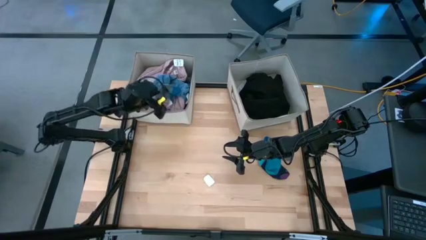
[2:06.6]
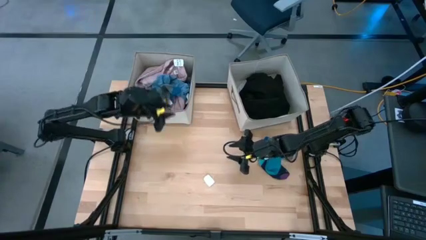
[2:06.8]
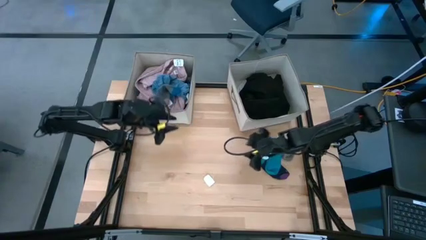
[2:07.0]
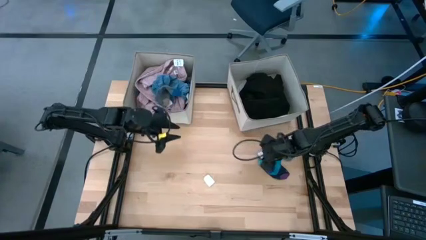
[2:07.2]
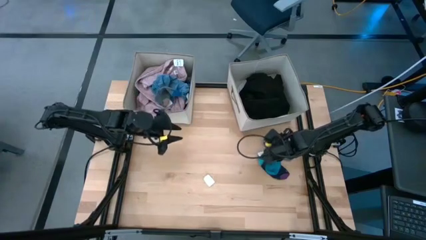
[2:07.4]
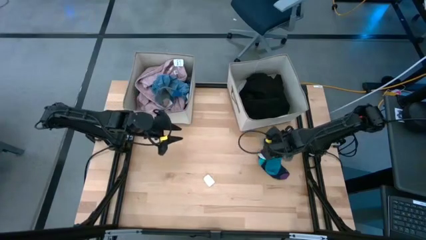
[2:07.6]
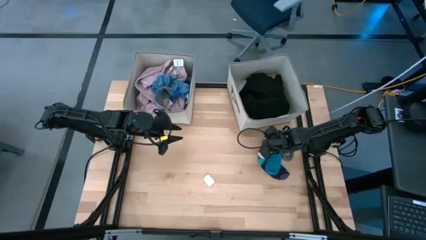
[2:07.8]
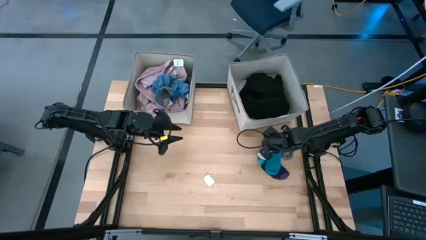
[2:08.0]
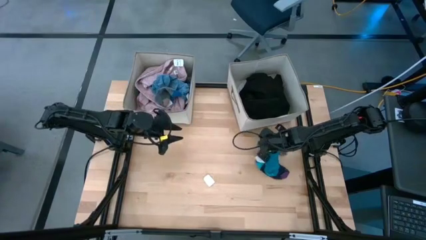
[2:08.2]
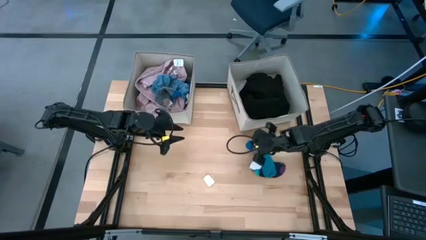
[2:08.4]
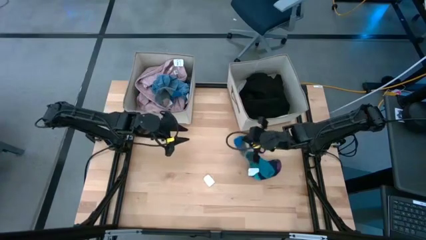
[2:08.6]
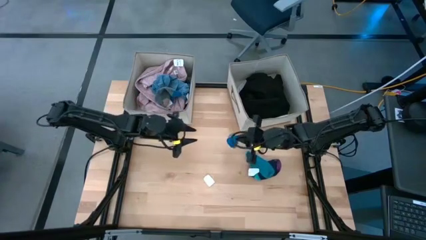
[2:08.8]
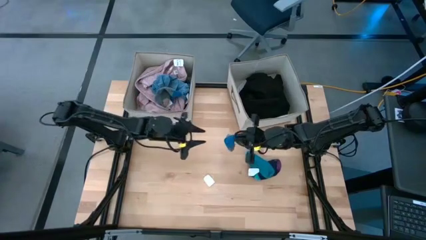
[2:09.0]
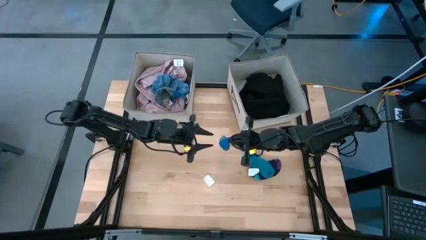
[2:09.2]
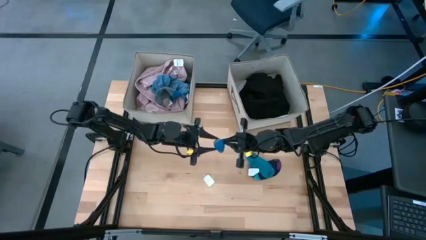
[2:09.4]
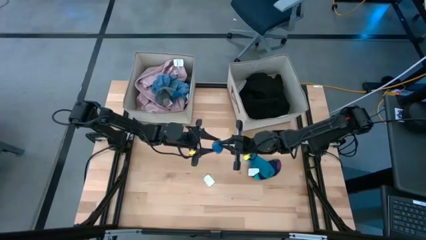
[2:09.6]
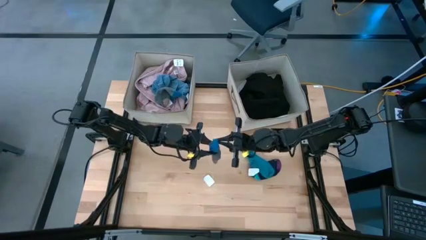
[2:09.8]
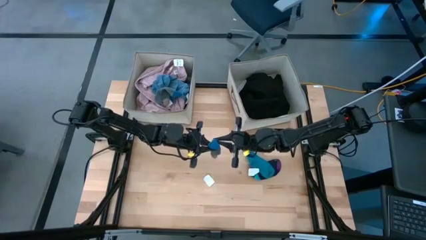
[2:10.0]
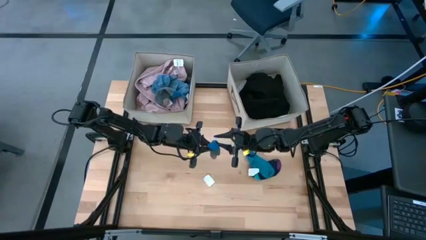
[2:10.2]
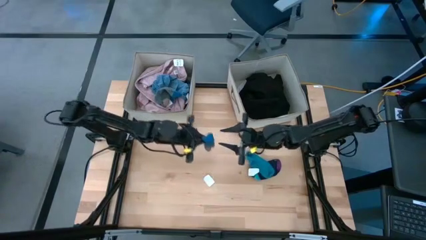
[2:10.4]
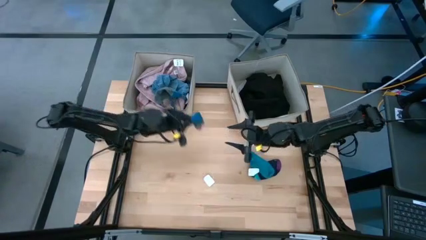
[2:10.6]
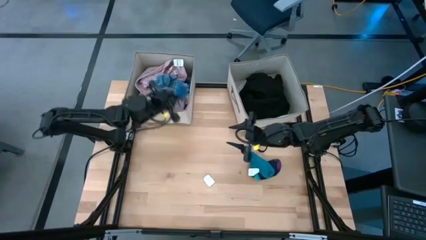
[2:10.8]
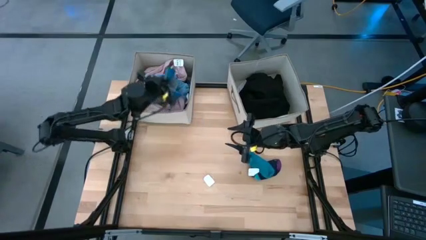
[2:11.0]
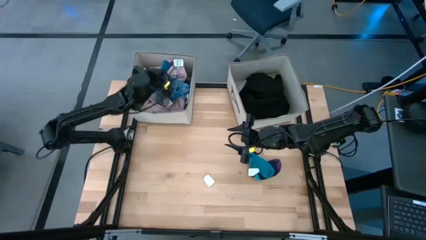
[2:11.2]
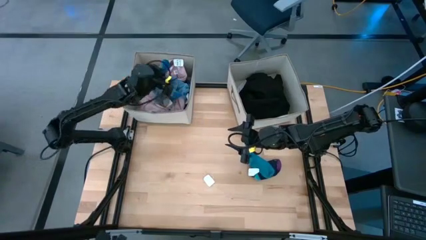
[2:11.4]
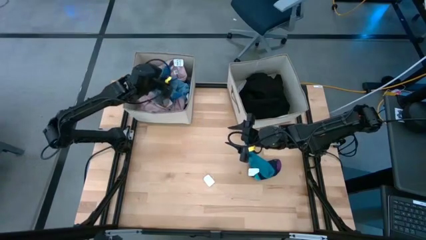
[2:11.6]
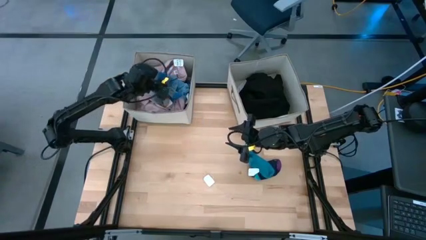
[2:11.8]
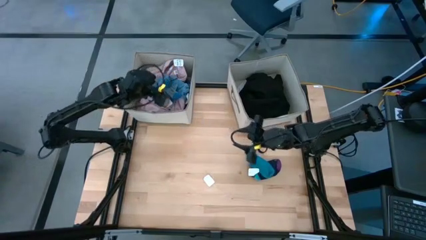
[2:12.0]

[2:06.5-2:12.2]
Task: Sort clothes
Put the gray sock into the left brown laundry organizer

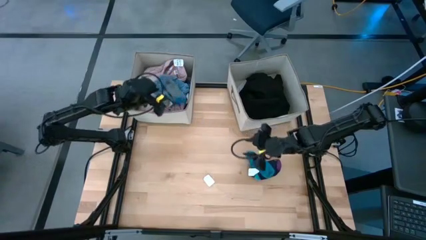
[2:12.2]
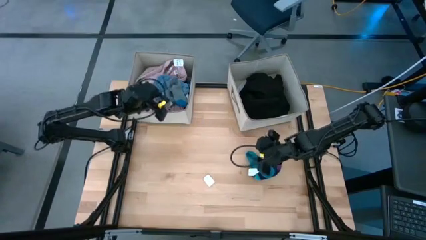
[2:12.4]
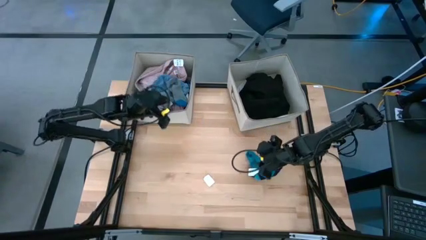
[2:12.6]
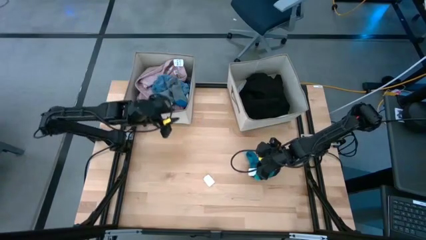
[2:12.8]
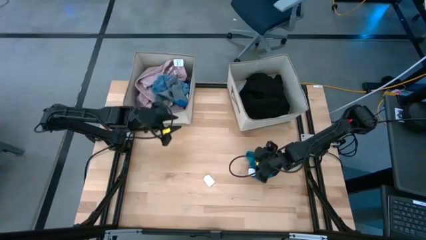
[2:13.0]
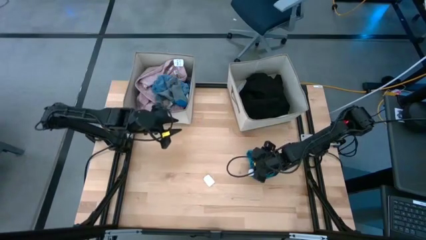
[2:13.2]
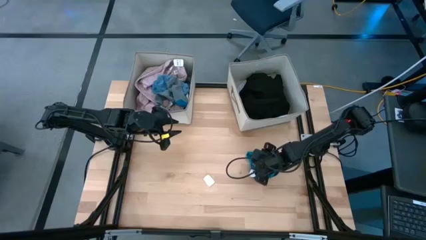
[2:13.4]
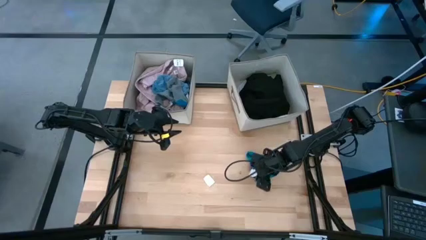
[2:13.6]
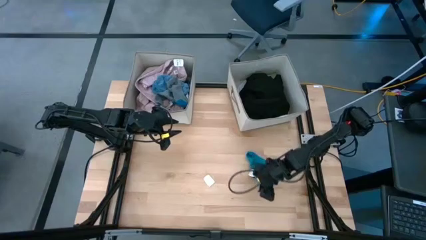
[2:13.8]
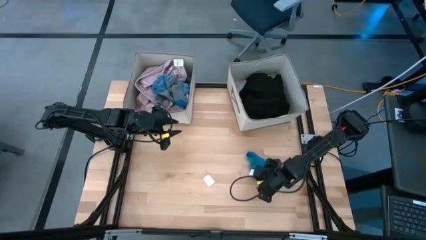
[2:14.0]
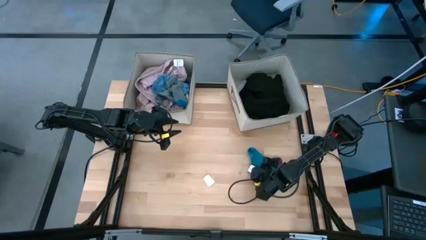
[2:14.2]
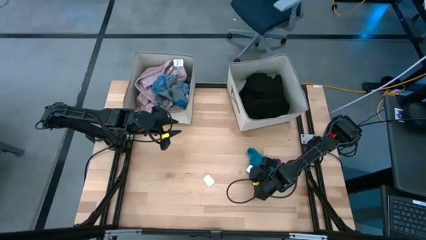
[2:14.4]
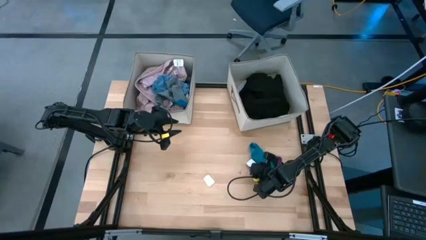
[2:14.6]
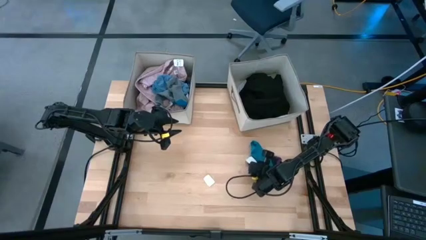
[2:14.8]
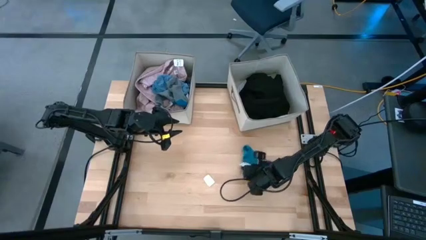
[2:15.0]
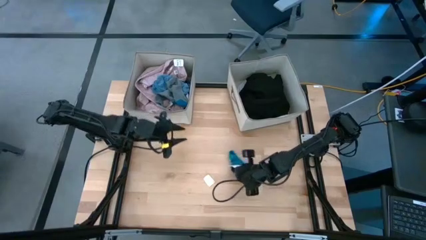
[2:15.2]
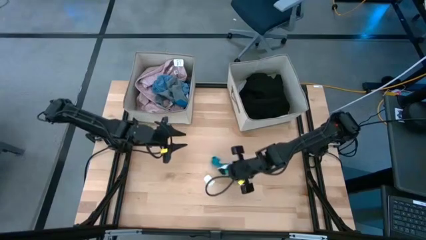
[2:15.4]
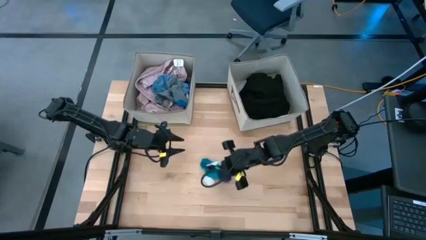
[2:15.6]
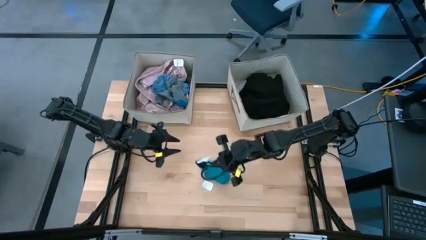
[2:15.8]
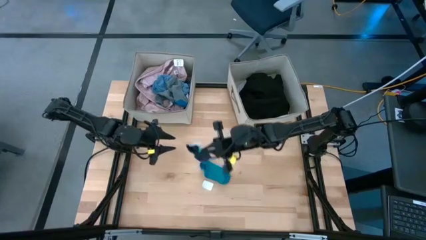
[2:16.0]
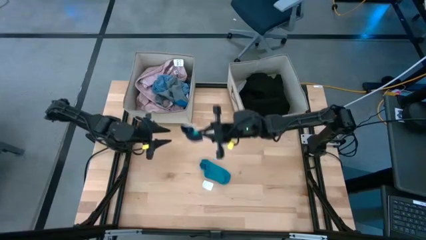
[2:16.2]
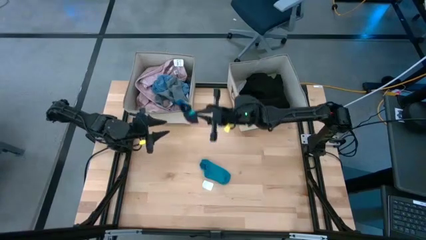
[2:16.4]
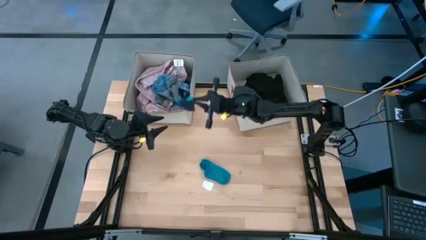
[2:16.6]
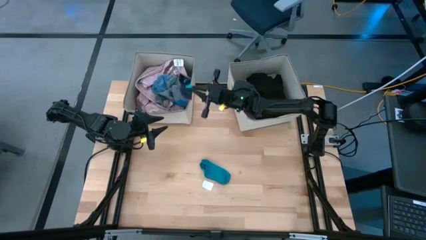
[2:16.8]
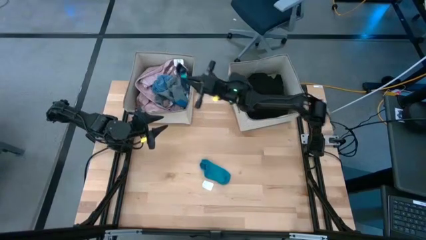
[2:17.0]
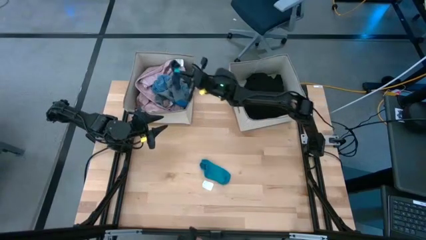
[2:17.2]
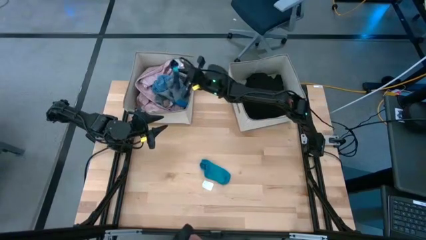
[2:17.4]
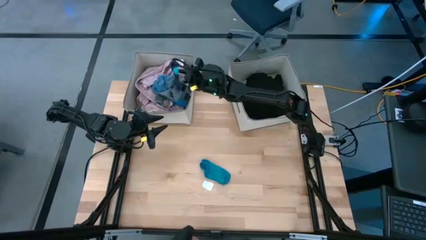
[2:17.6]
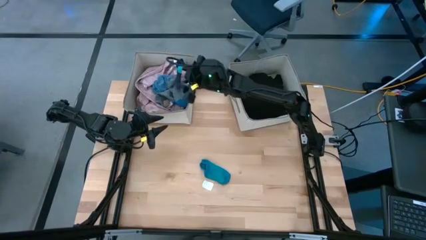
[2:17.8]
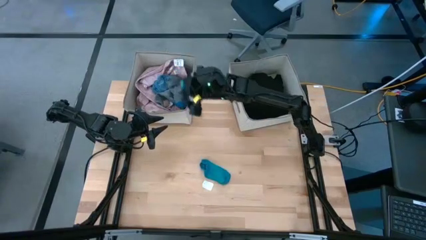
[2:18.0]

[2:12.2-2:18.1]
Put the dark blue sock into the left brown laundry organizer

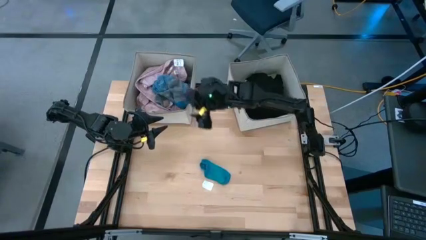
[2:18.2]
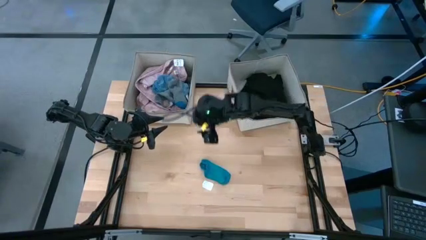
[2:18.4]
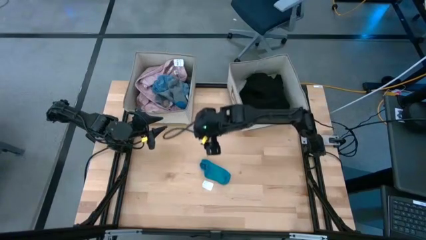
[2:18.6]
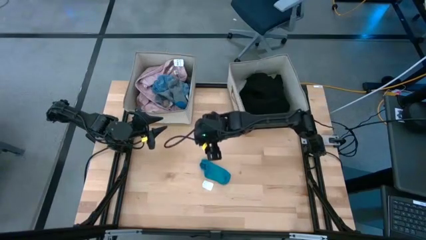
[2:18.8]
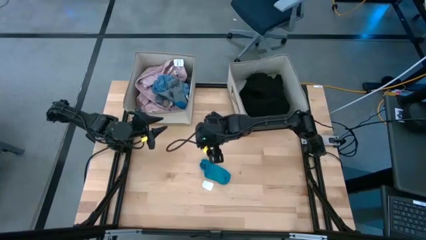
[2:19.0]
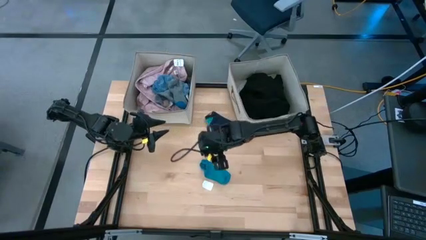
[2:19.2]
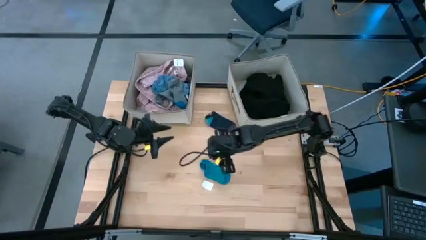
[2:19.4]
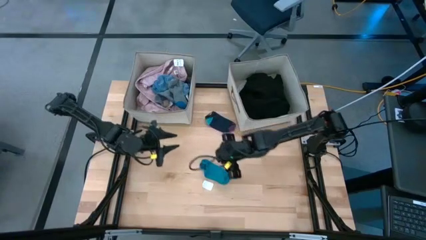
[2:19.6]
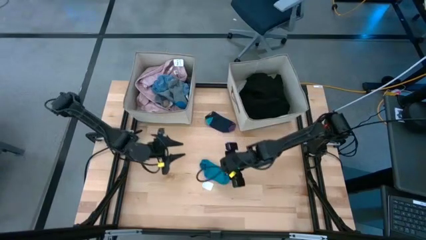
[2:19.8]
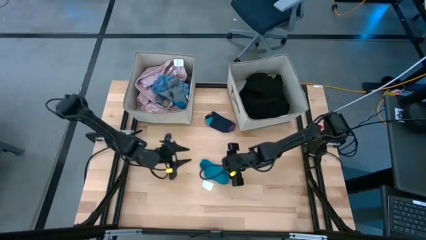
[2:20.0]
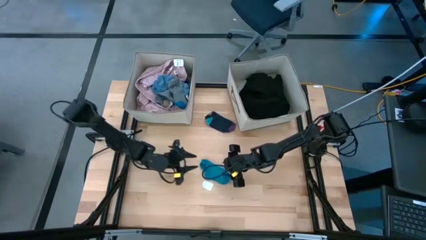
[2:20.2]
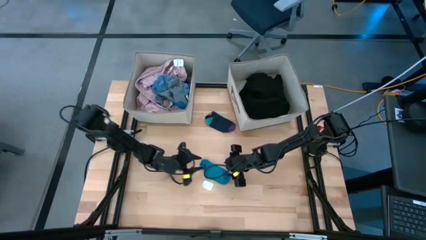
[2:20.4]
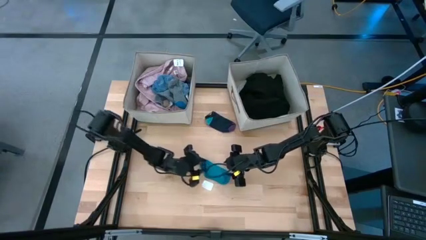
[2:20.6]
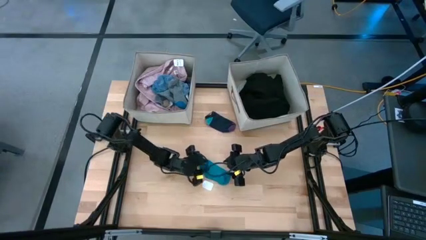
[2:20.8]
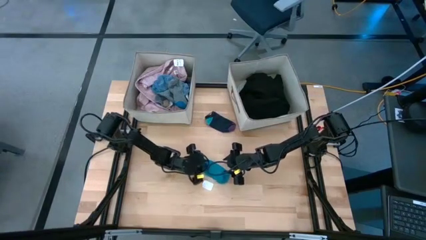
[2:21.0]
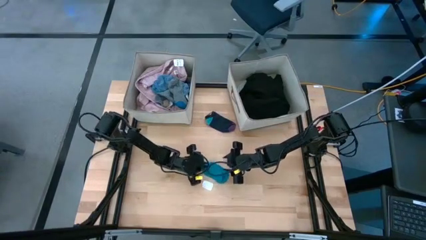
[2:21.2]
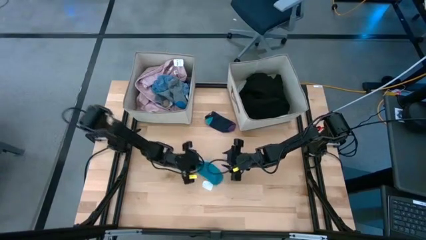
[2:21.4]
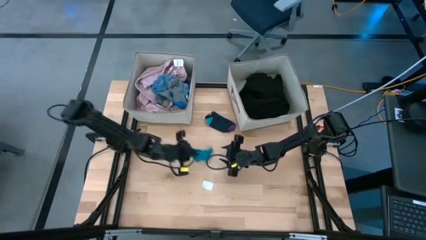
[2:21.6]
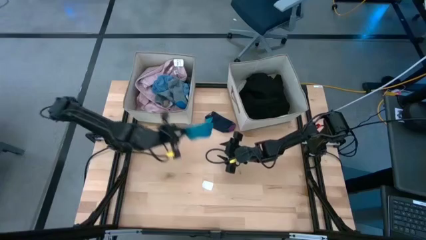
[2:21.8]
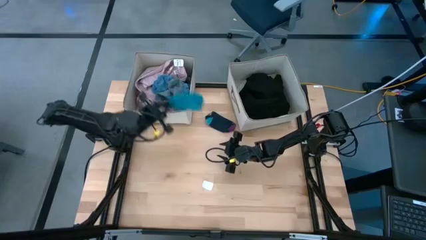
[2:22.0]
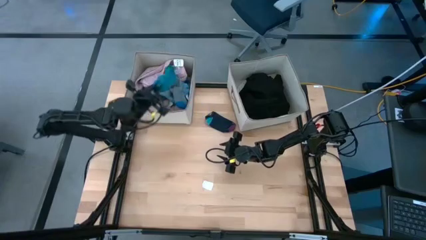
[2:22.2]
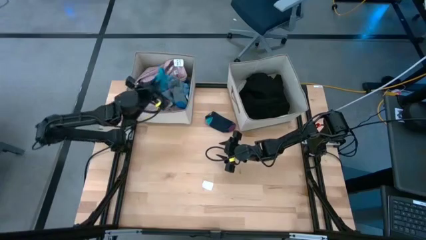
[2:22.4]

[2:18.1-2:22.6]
Put the blue sock into the left brown laundry organizer
